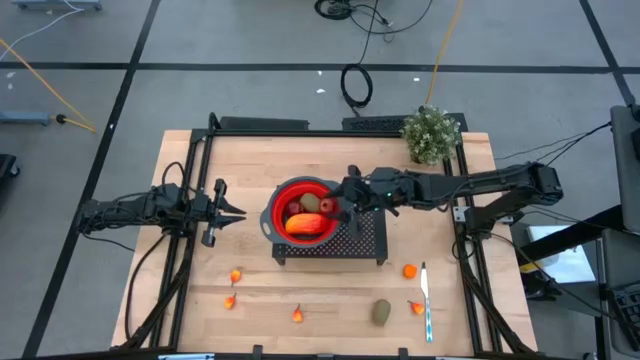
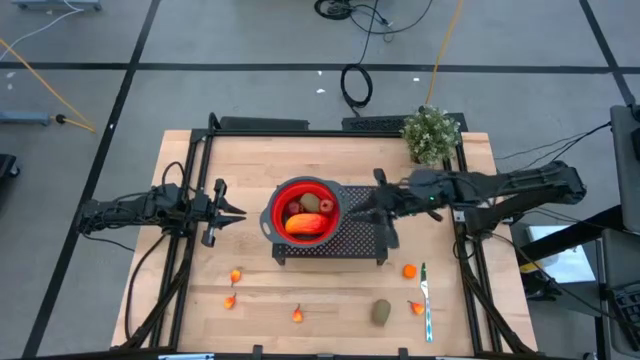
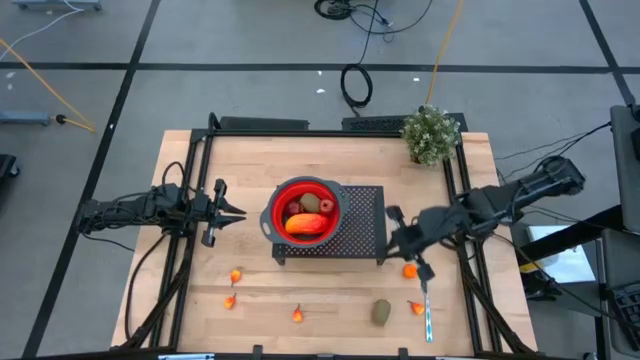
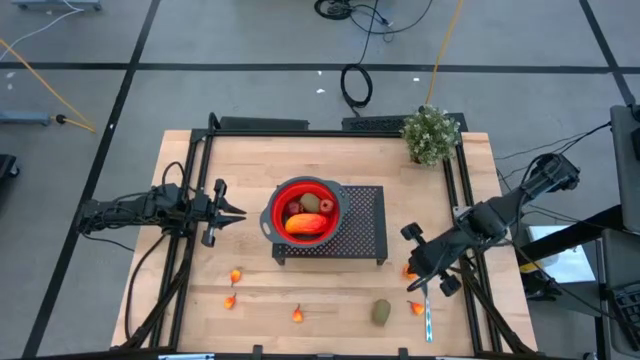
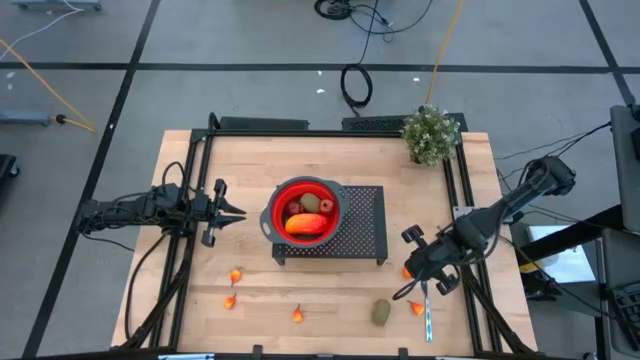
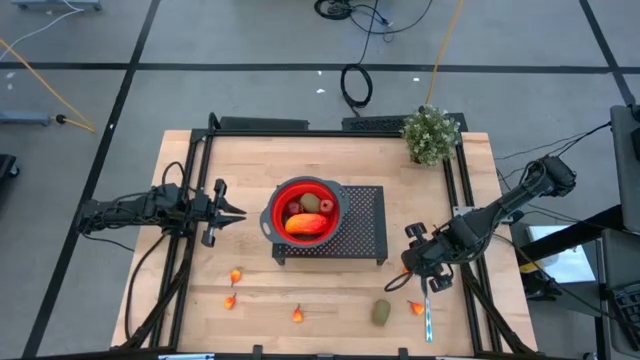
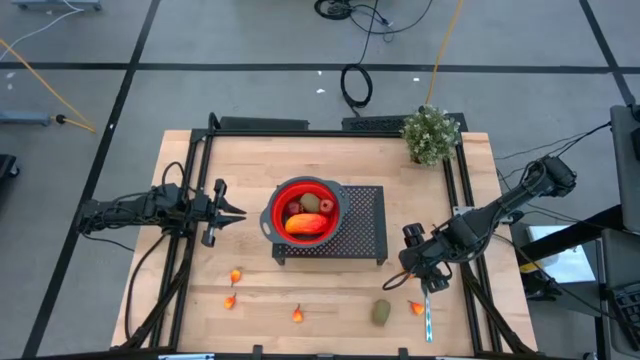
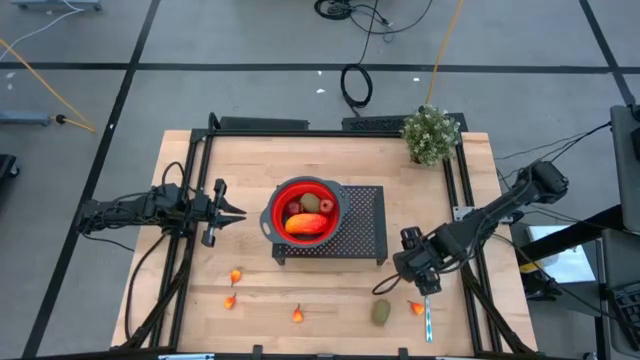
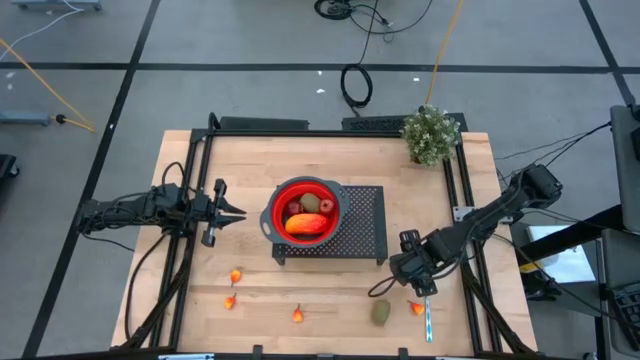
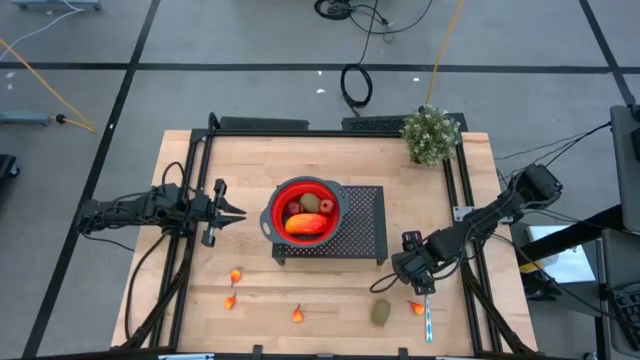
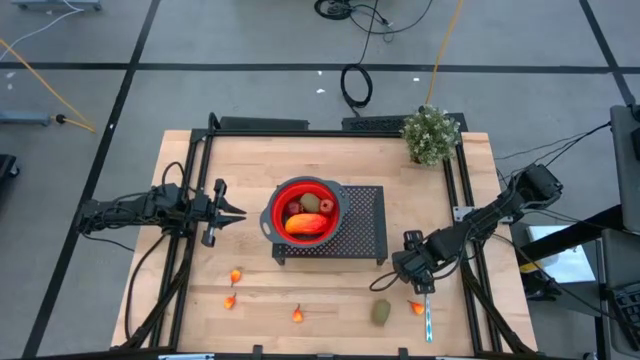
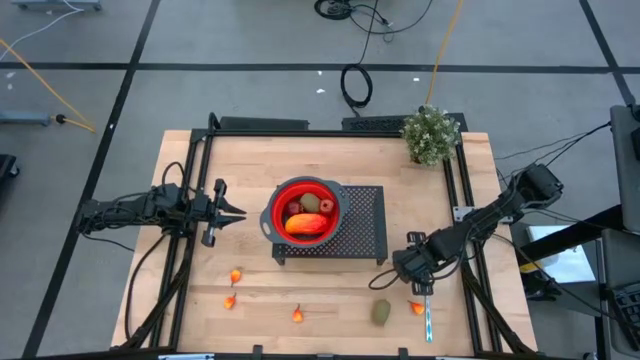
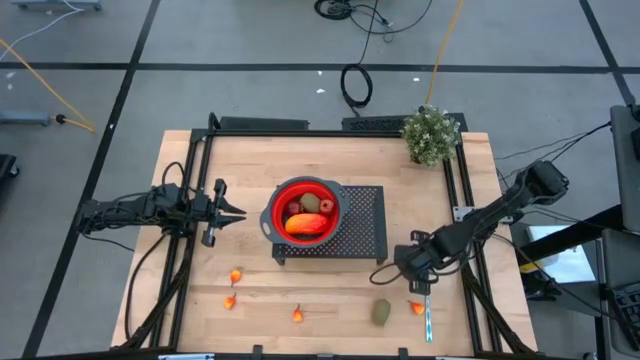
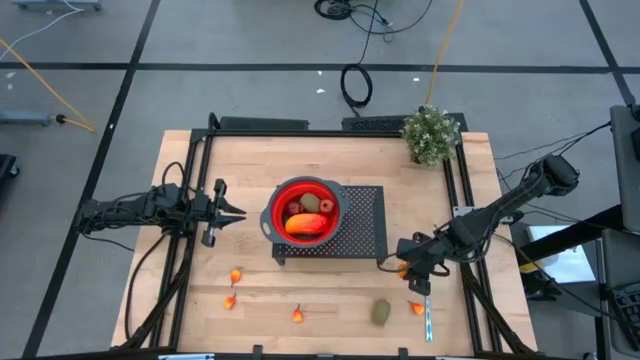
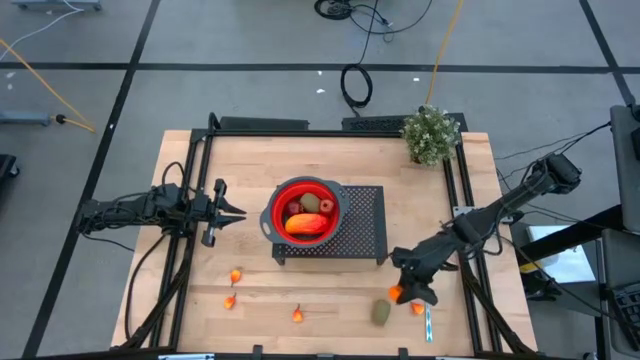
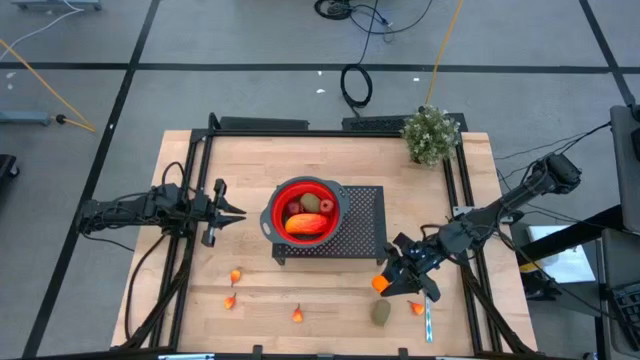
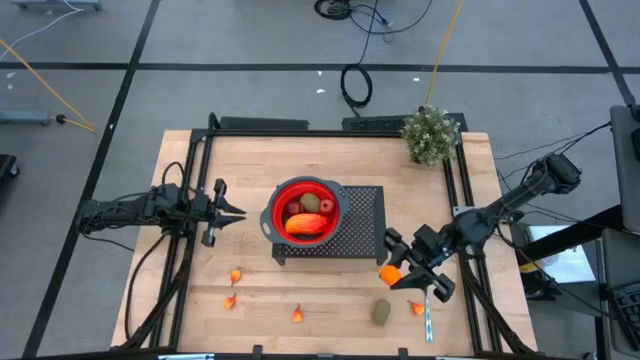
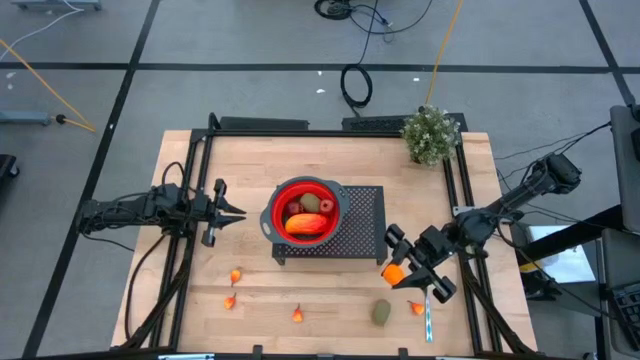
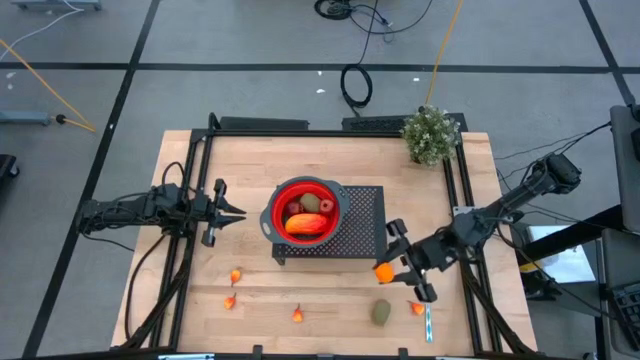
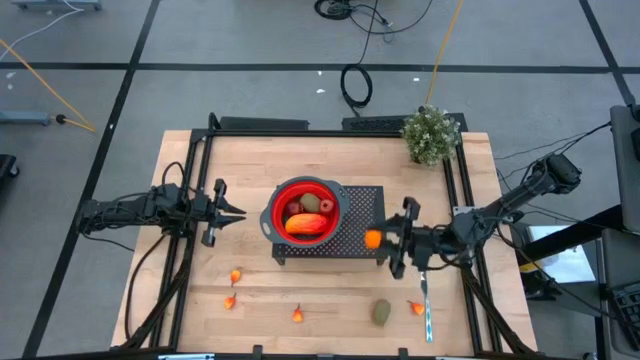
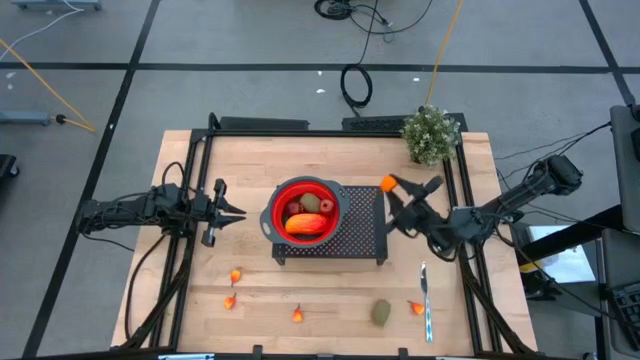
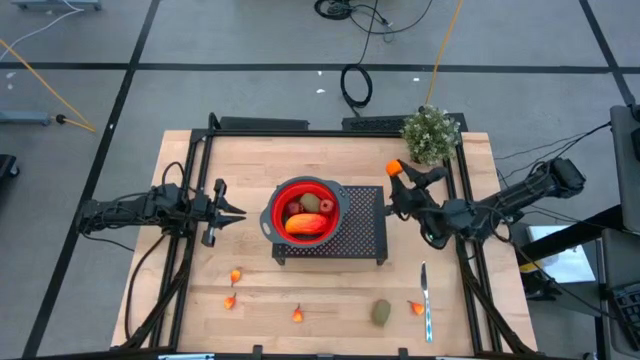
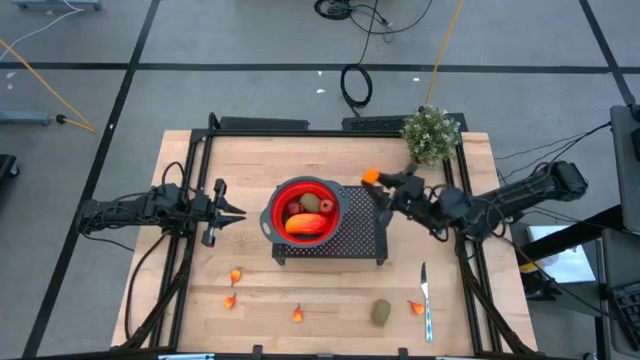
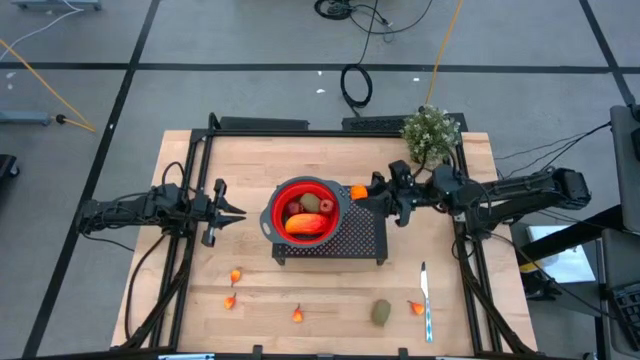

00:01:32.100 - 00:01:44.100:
Task: Pick & Place Fruit
Put the orange into the red strainer bowl on the shelf

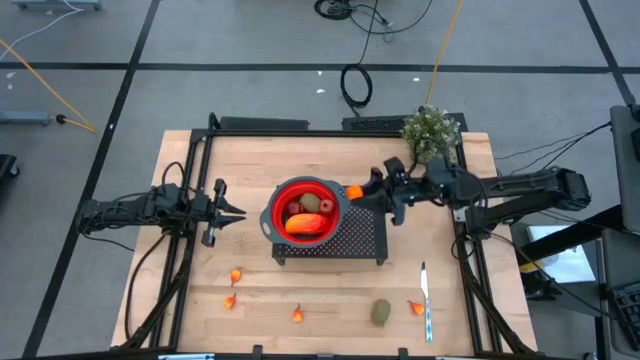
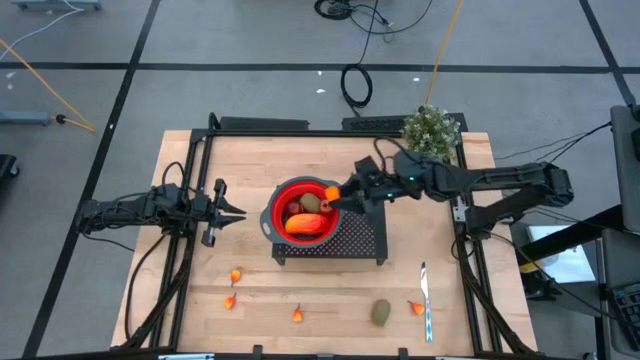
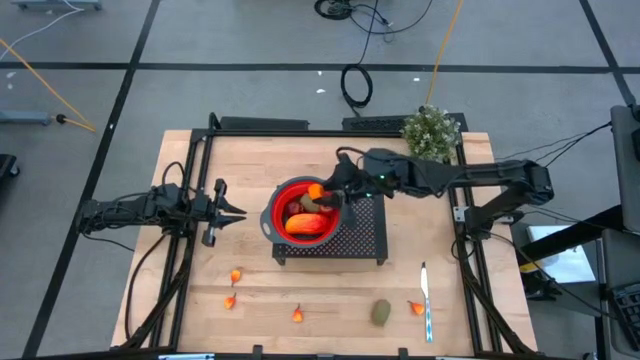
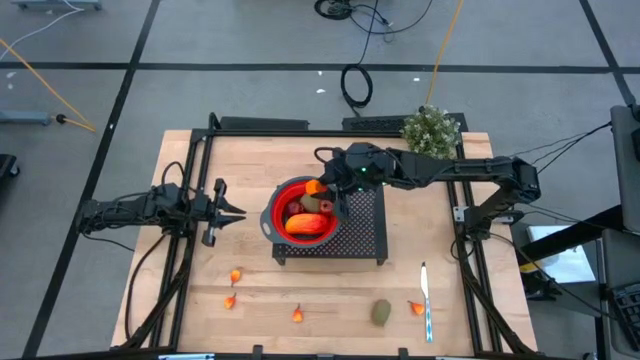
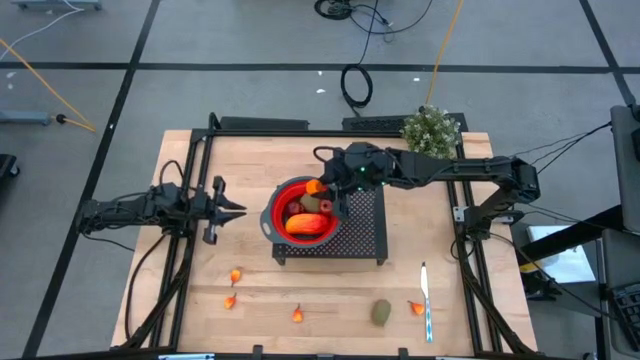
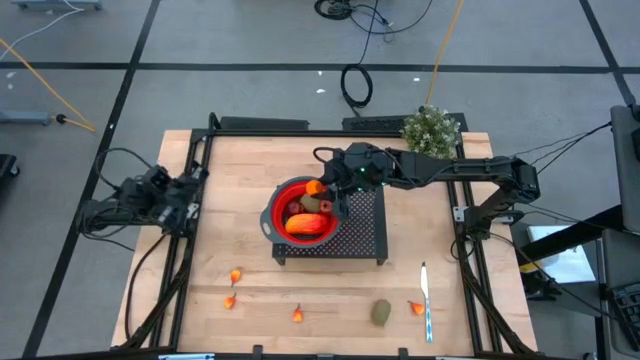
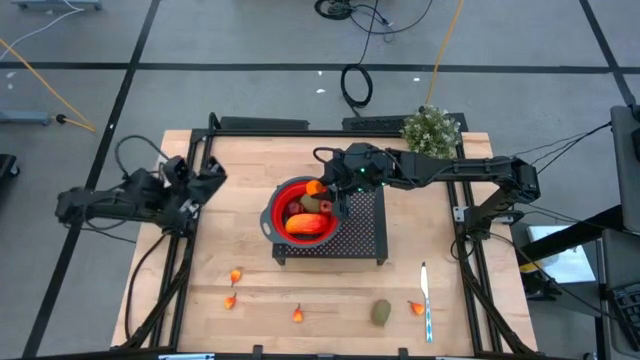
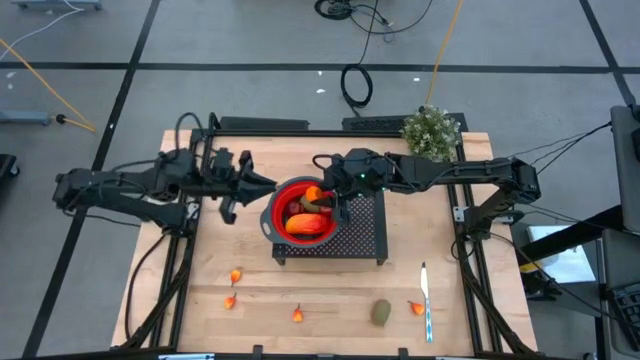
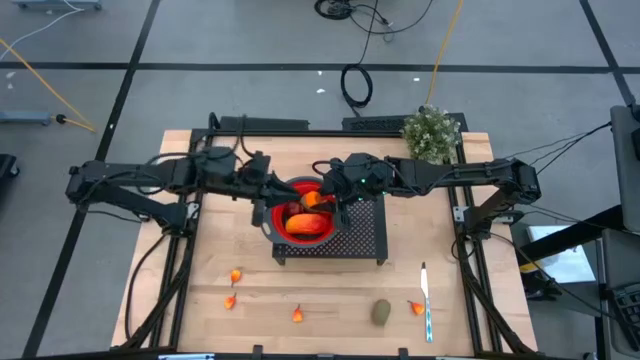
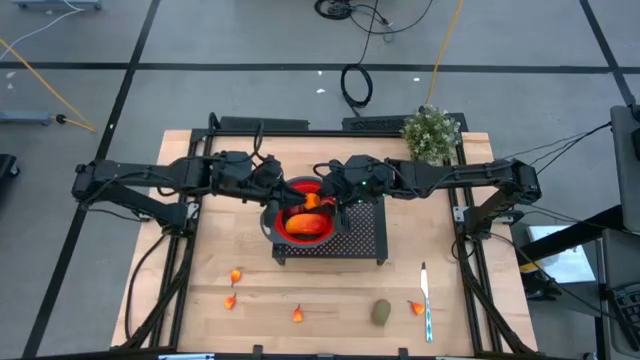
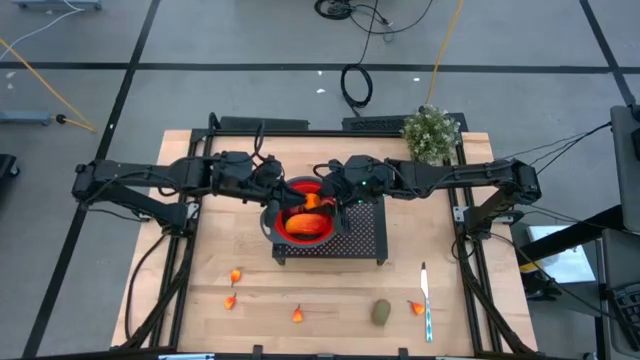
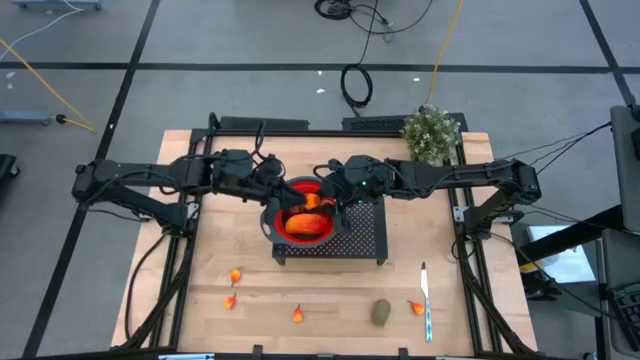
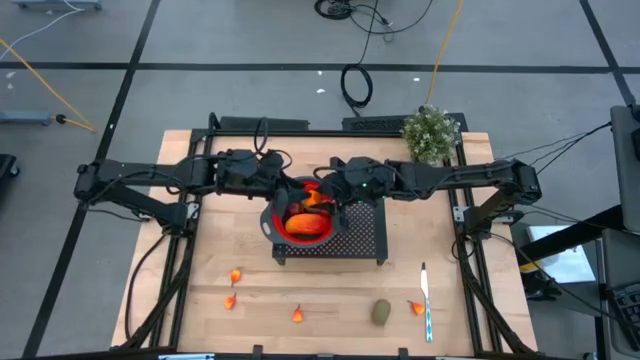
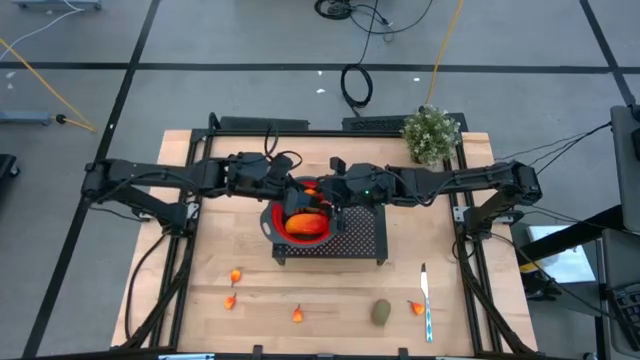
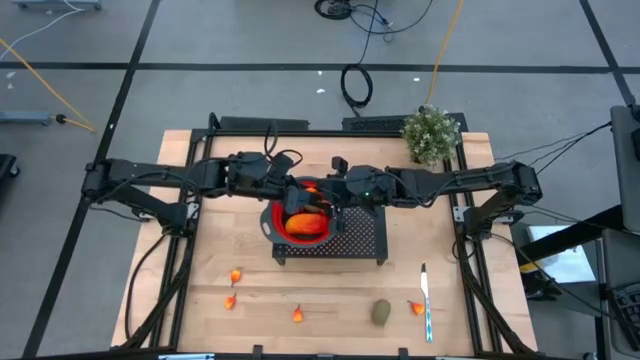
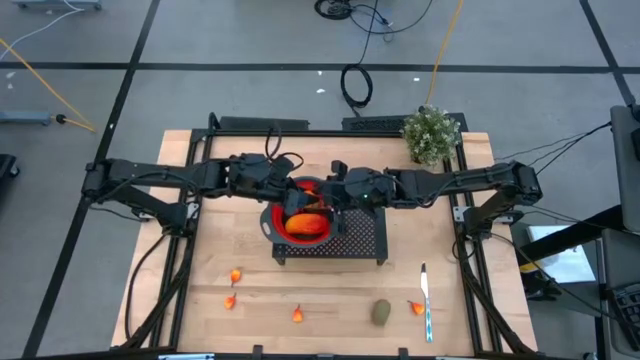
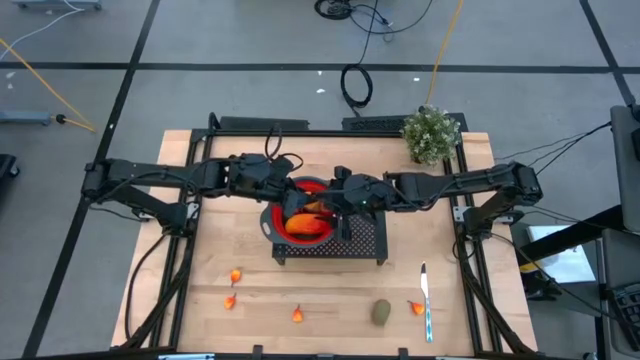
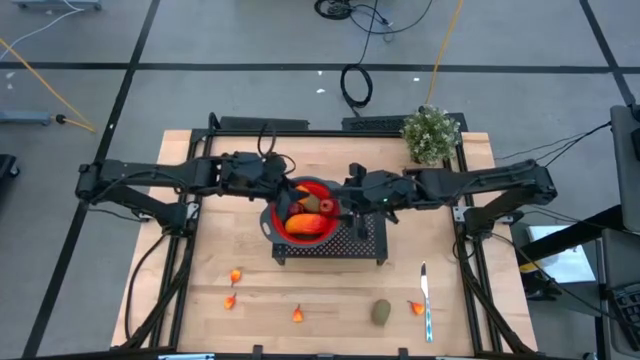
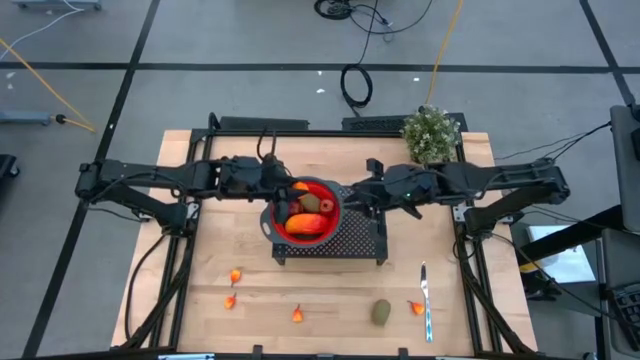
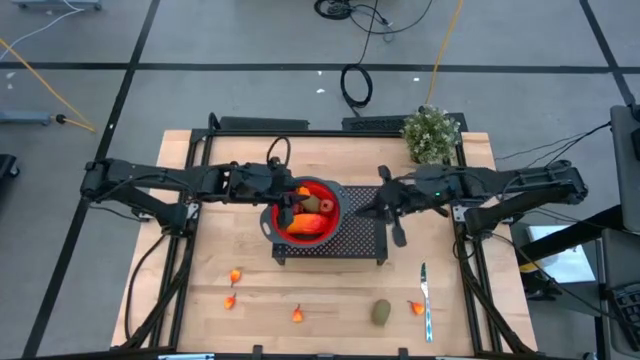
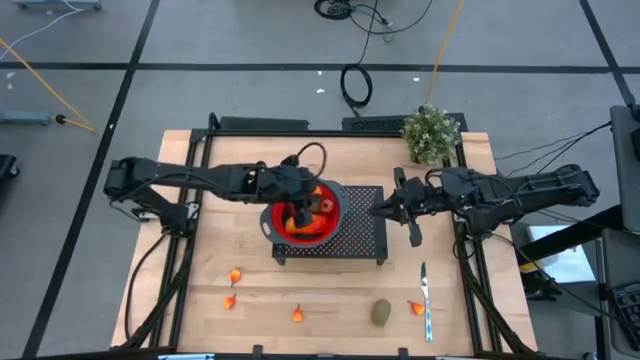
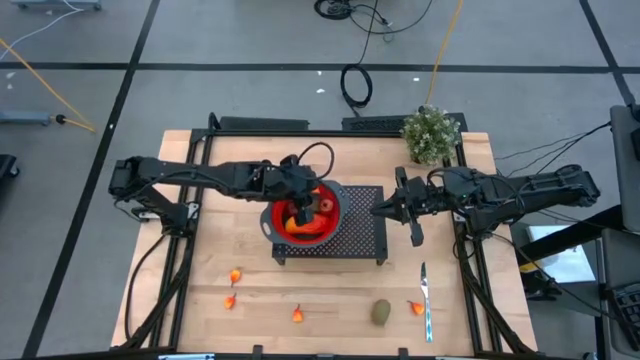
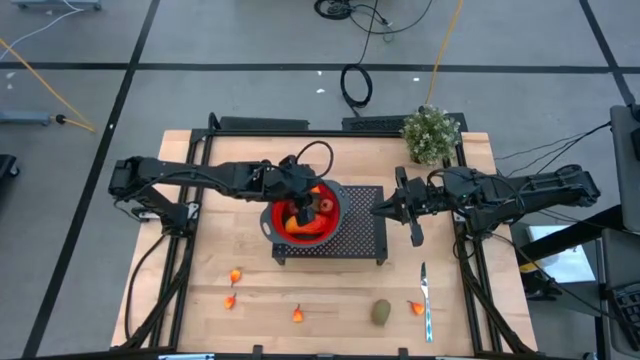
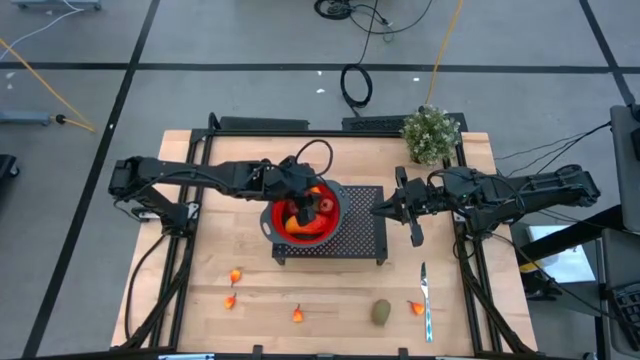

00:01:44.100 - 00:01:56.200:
Put the orange into the red strainer bowl on the shelf
